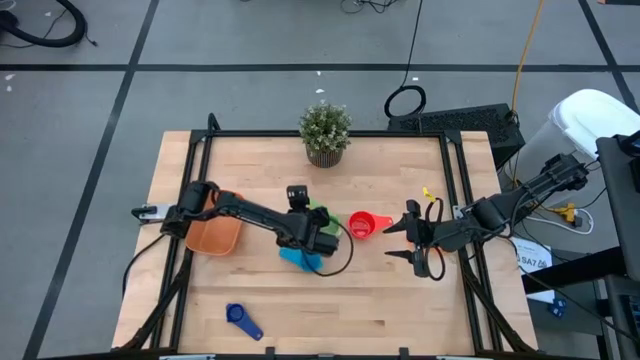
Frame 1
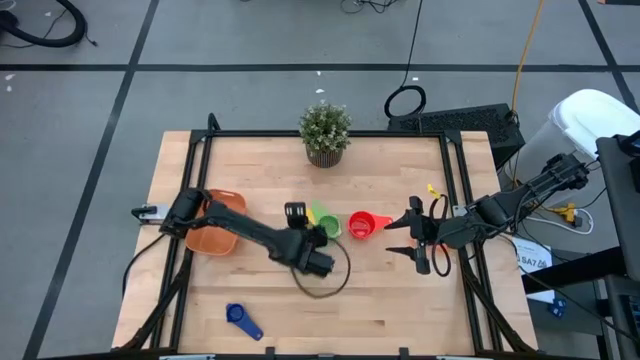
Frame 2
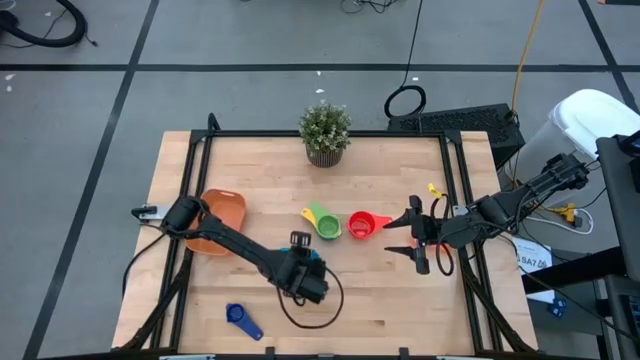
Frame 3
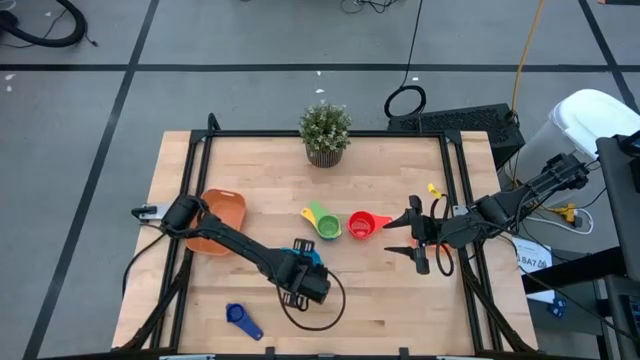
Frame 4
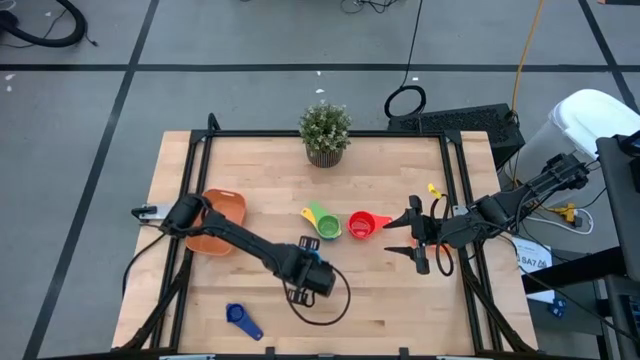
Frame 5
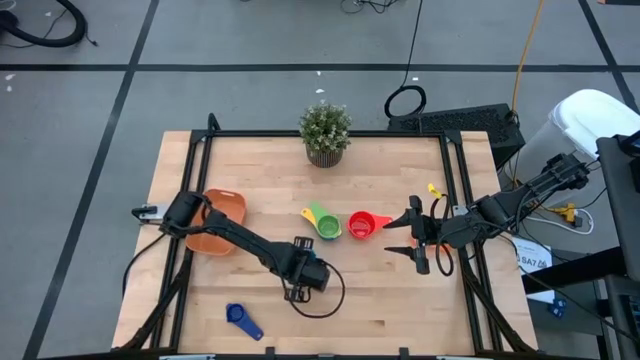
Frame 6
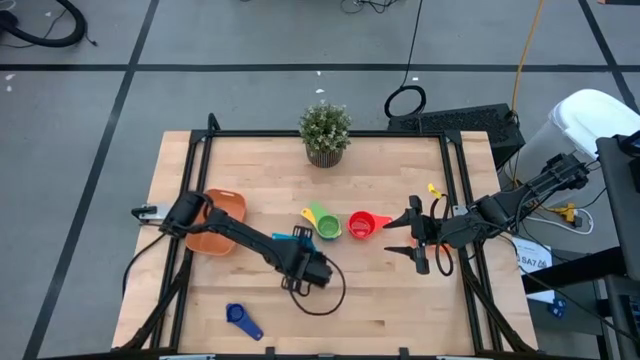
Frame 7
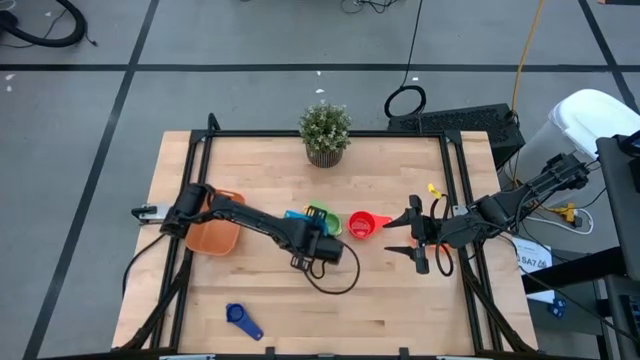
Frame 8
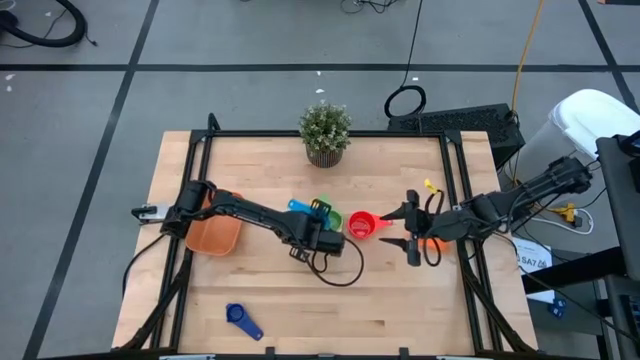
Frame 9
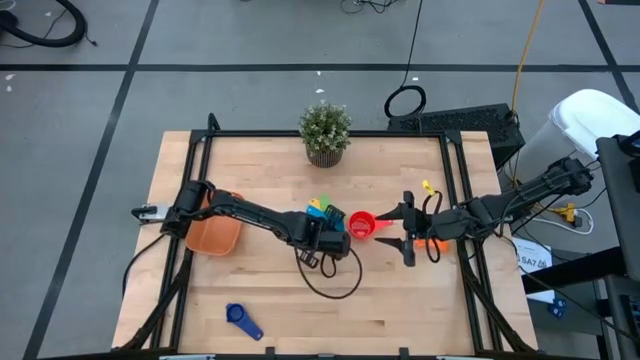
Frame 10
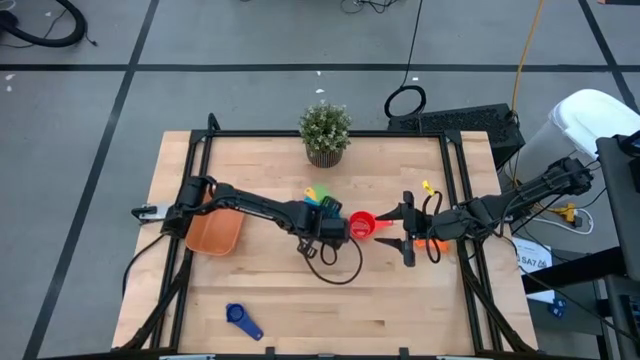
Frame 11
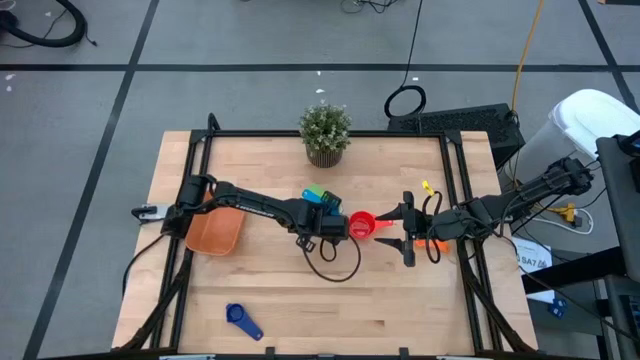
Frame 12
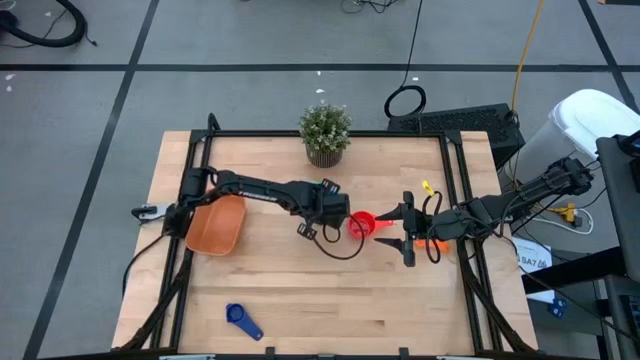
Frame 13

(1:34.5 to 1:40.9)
Task: Nest measuring cups in basket
Stack the light blue measuring cup on top of the green measuring cup

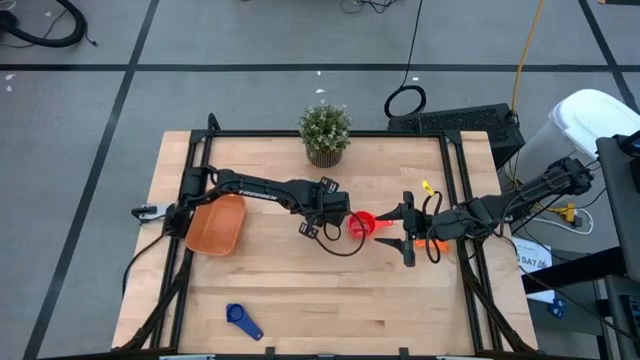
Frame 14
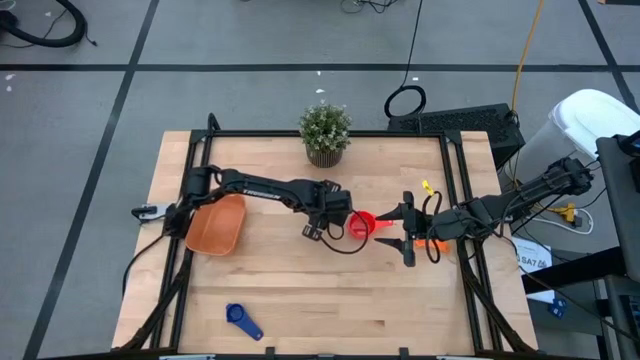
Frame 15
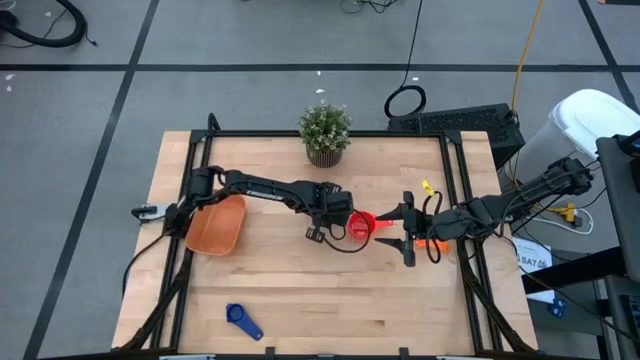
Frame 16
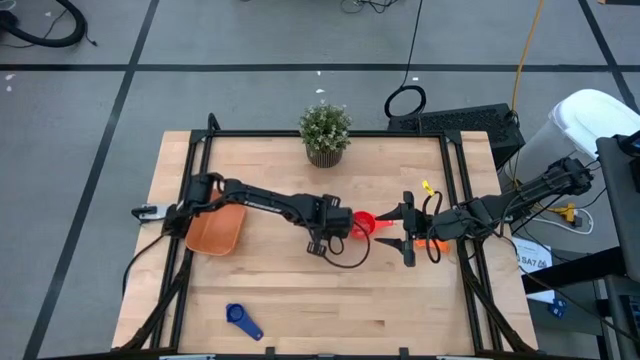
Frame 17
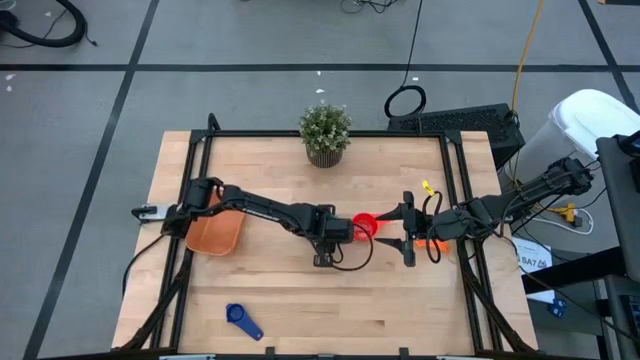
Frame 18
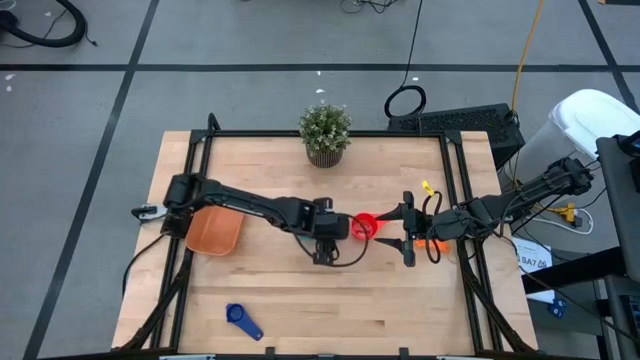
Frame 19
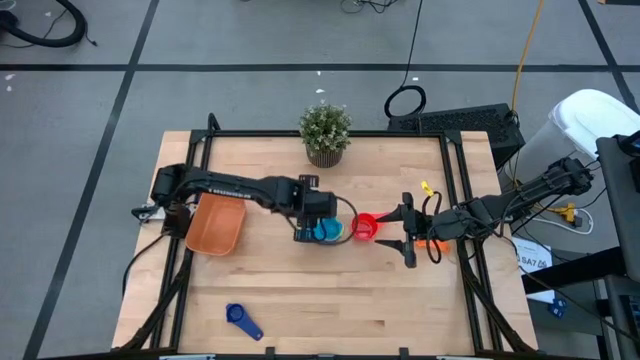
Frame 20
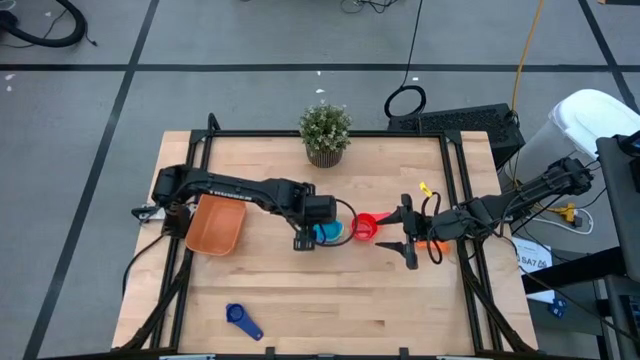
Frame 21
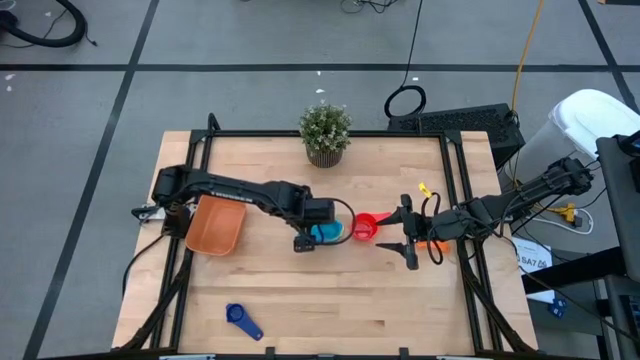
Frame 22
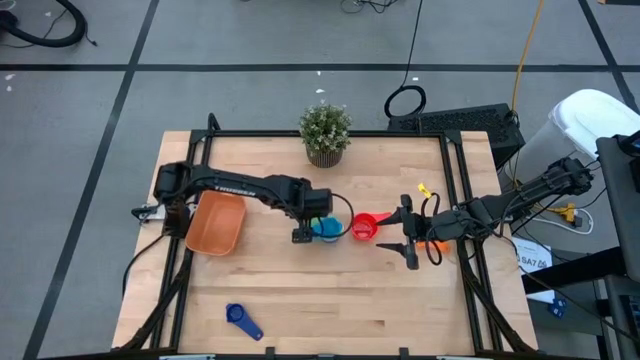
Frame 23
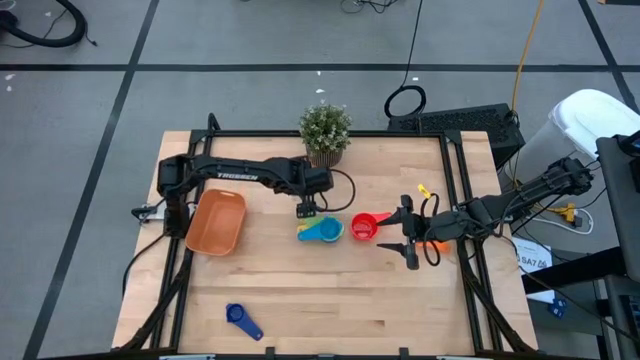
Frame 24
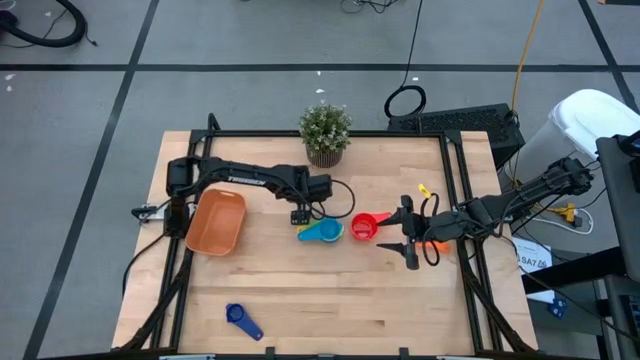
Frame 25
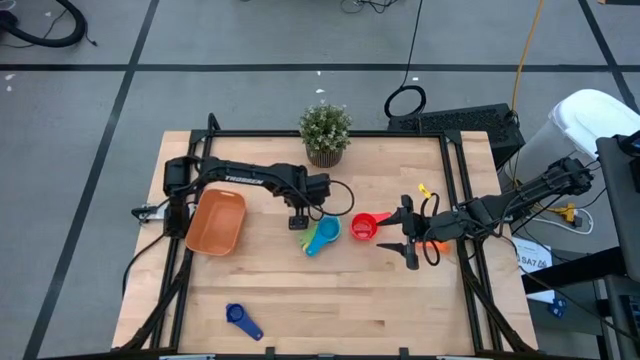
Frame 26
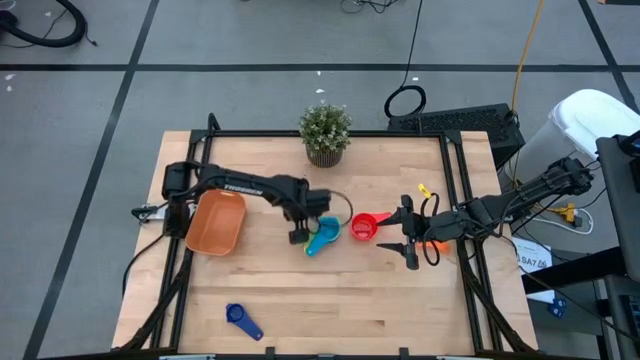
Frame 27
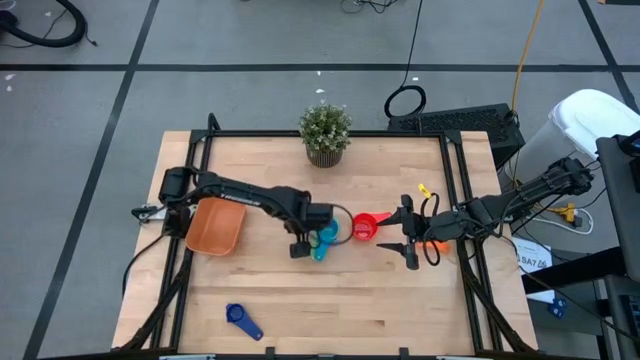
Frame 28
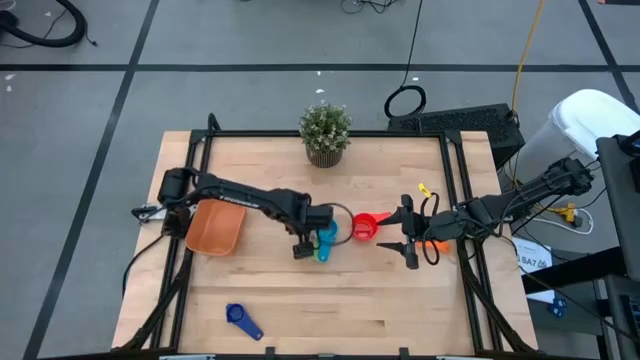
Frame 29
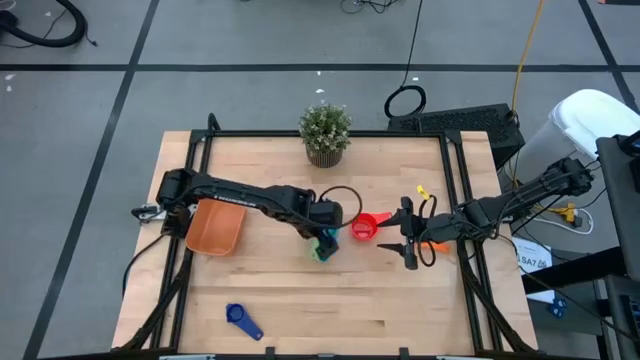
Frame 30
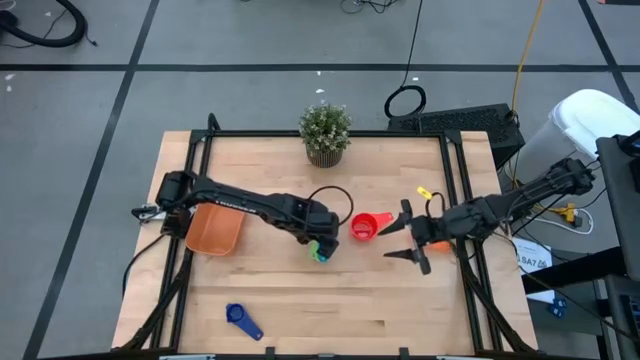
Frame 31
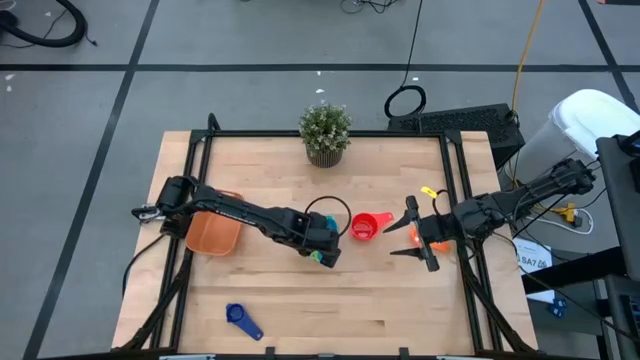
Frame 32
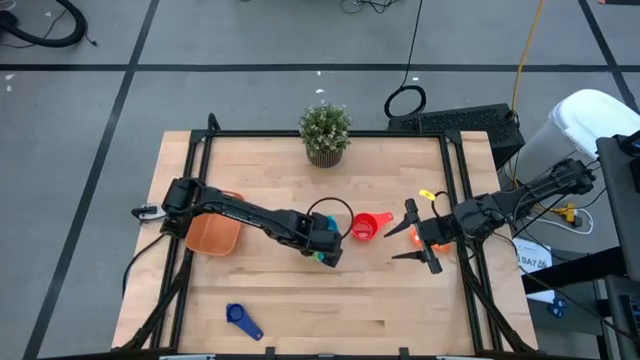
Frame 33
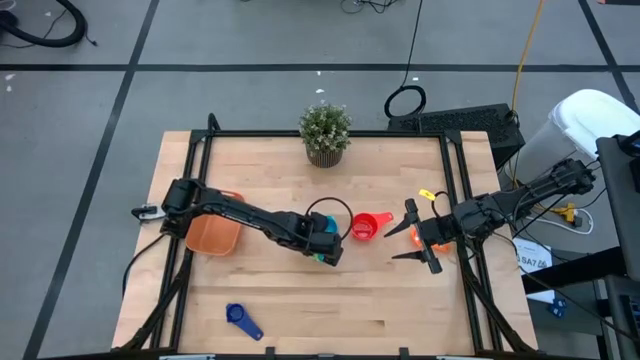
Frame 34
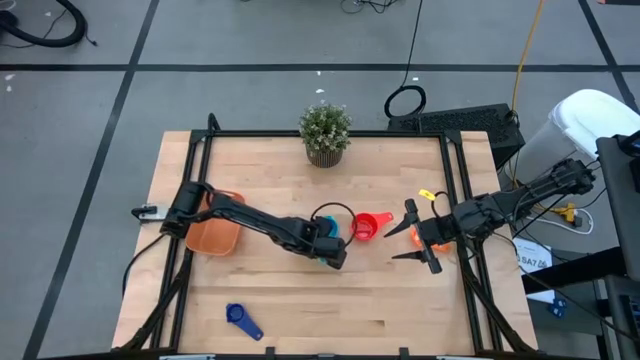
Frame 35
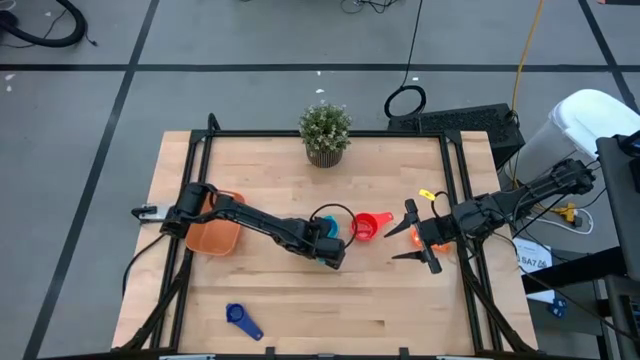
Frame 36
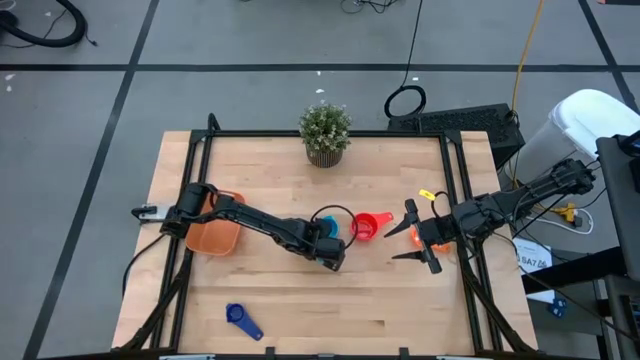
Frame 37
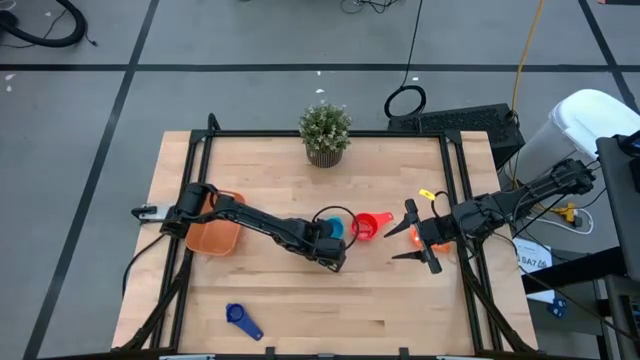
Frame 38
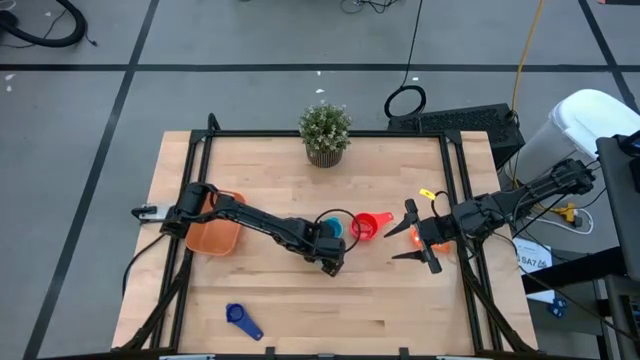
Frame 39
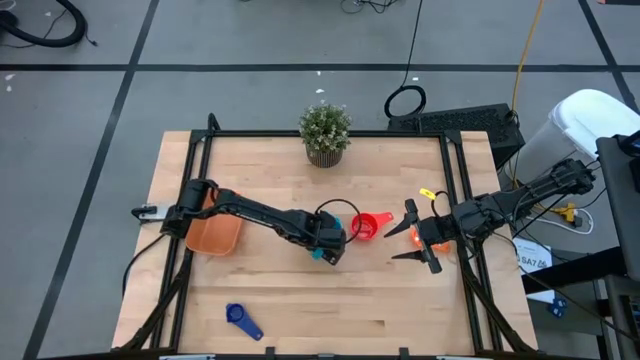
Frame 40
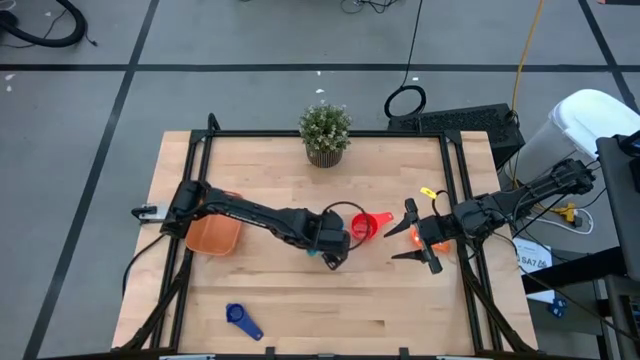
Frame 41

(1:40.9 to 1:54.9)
Stack the stacked measuring cups on top of the red measuring cup
